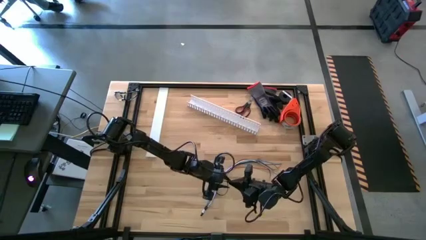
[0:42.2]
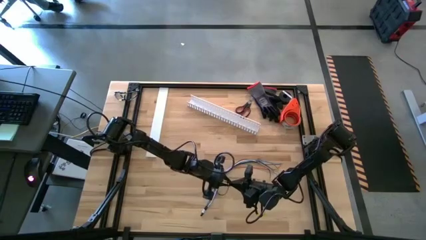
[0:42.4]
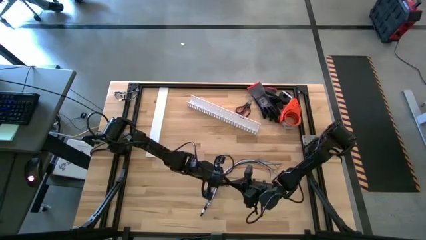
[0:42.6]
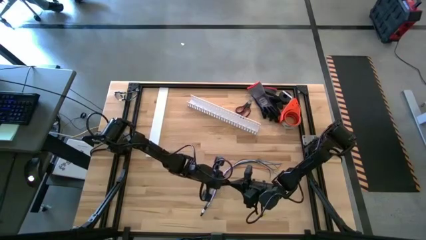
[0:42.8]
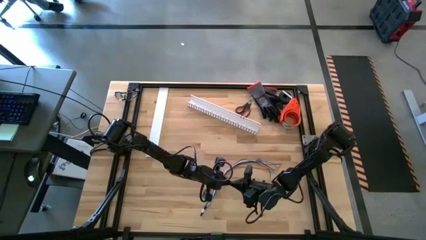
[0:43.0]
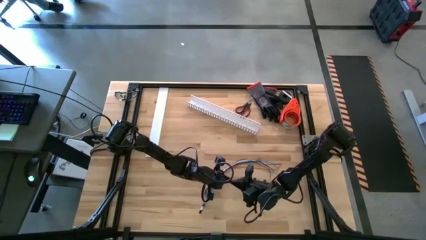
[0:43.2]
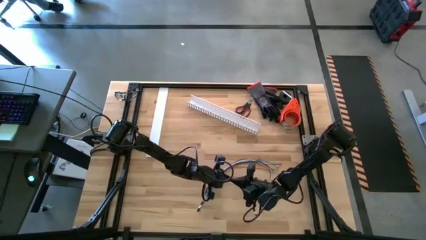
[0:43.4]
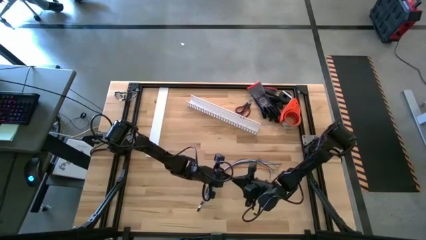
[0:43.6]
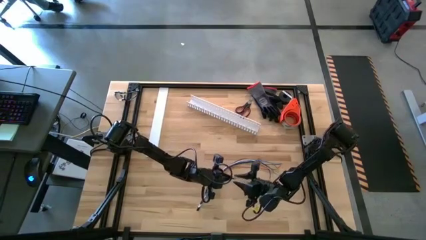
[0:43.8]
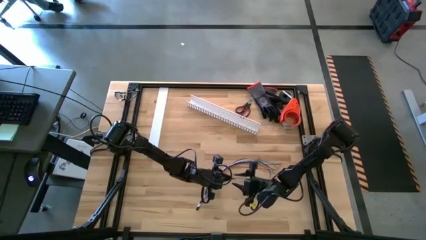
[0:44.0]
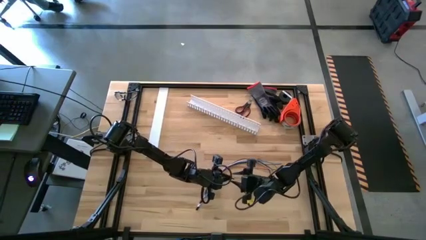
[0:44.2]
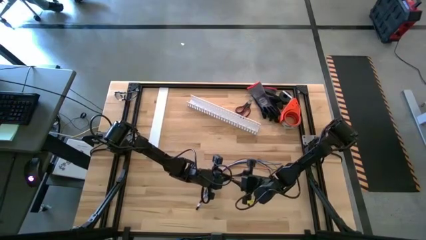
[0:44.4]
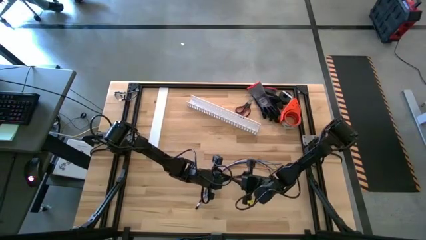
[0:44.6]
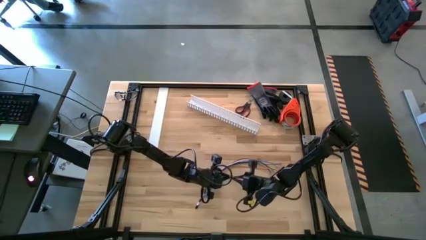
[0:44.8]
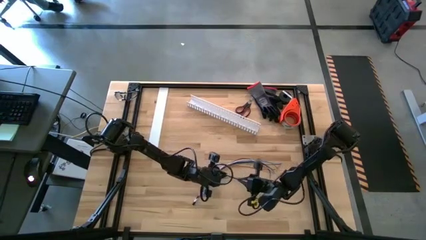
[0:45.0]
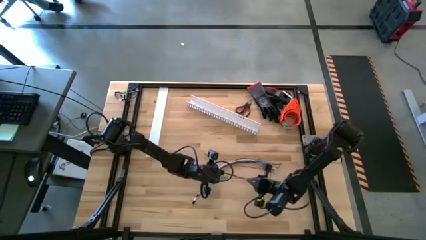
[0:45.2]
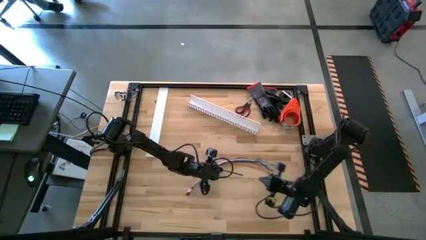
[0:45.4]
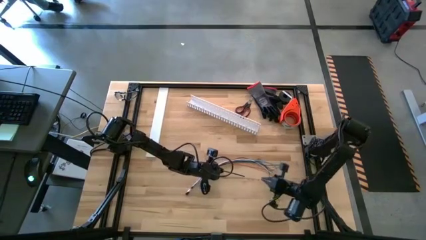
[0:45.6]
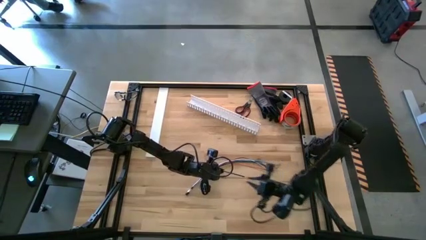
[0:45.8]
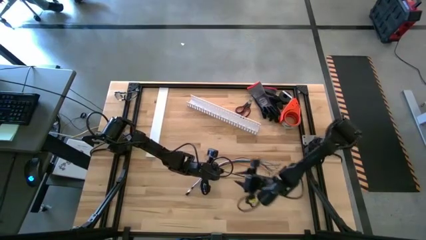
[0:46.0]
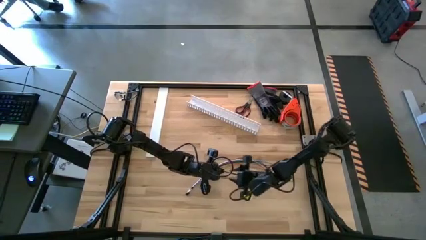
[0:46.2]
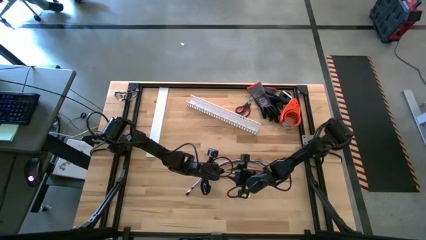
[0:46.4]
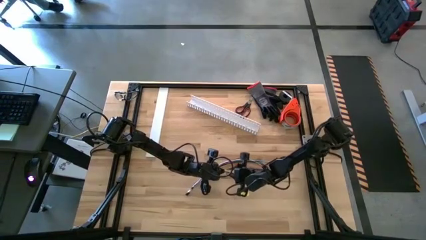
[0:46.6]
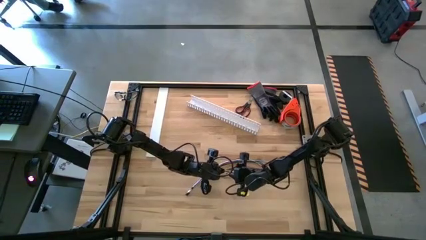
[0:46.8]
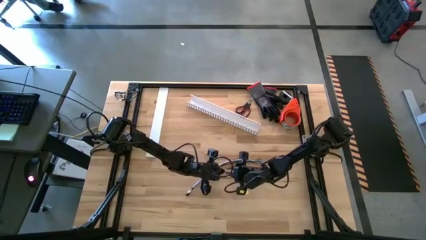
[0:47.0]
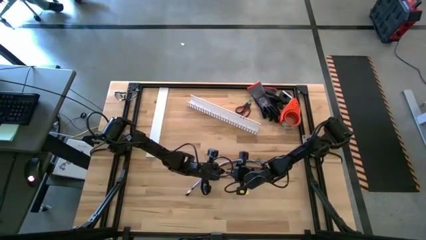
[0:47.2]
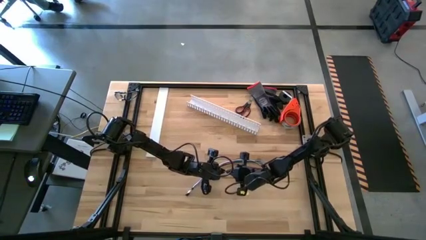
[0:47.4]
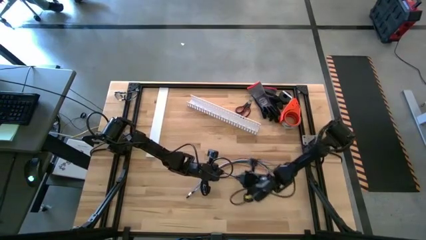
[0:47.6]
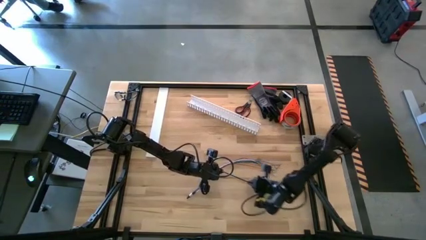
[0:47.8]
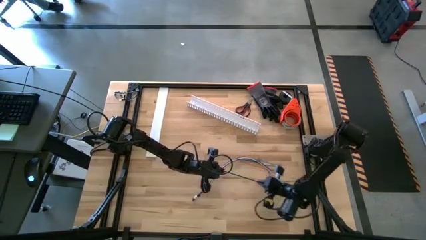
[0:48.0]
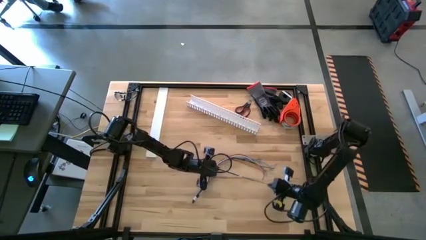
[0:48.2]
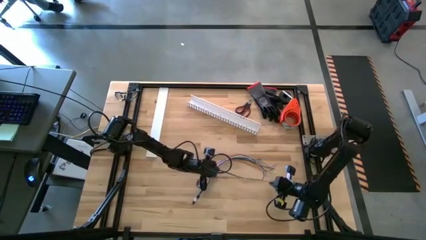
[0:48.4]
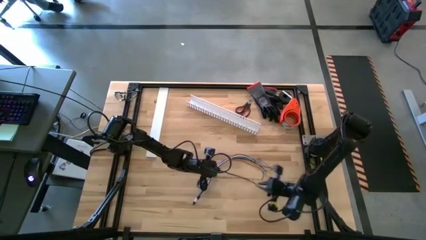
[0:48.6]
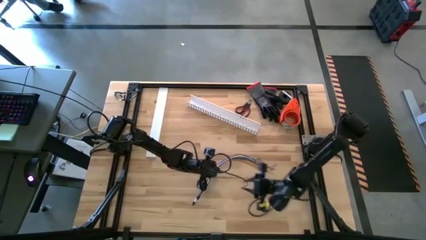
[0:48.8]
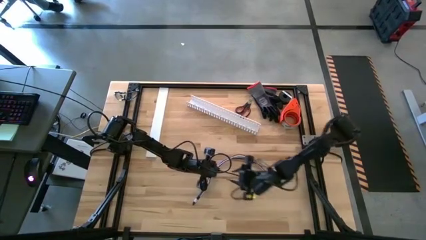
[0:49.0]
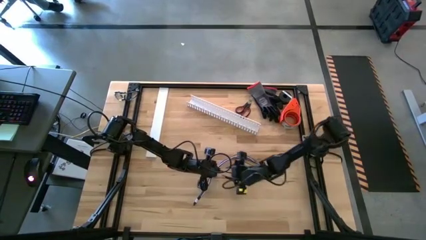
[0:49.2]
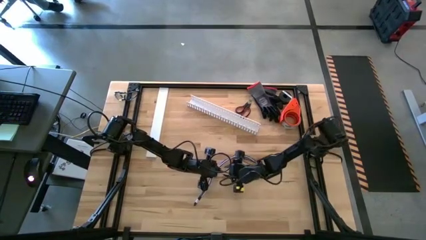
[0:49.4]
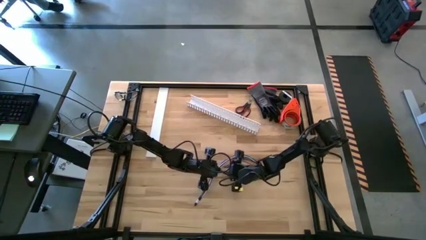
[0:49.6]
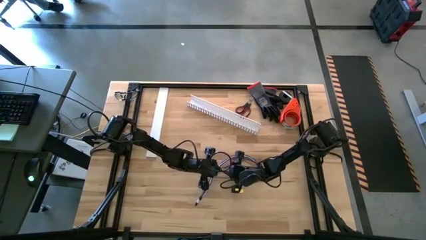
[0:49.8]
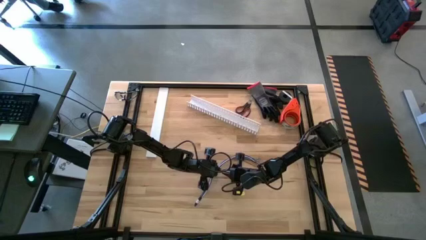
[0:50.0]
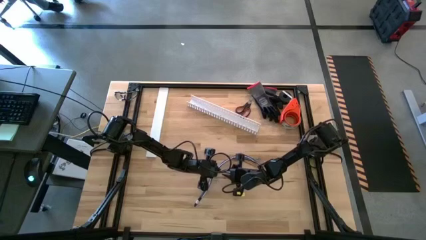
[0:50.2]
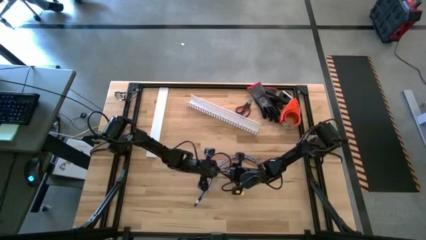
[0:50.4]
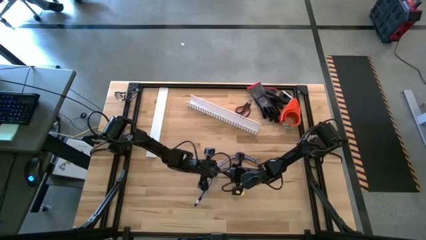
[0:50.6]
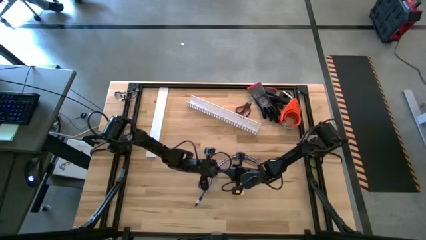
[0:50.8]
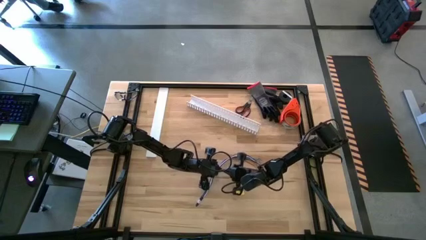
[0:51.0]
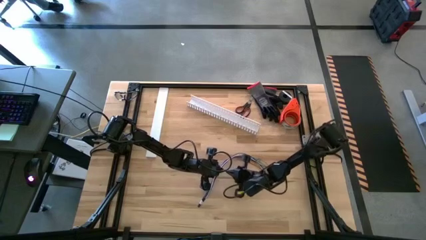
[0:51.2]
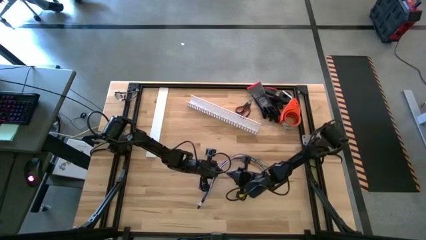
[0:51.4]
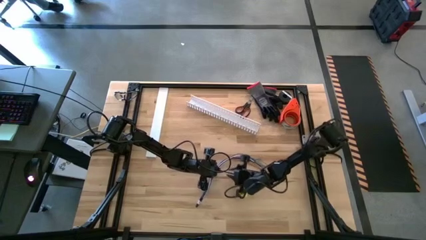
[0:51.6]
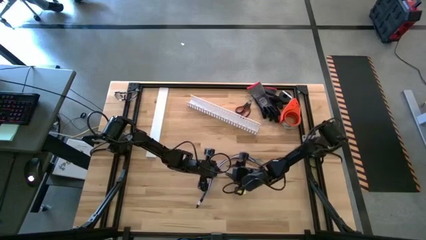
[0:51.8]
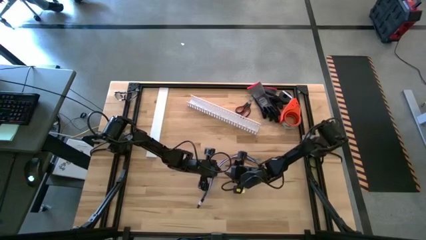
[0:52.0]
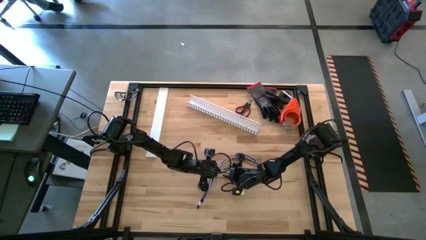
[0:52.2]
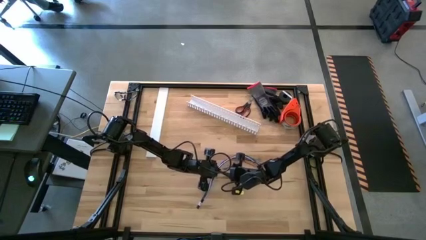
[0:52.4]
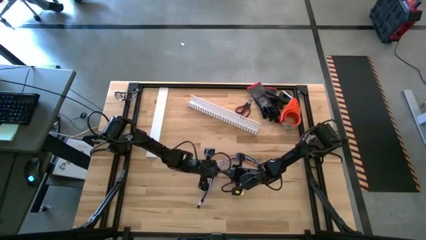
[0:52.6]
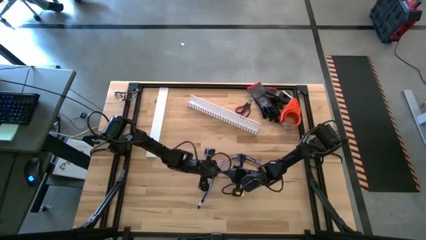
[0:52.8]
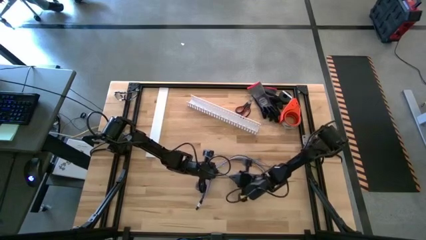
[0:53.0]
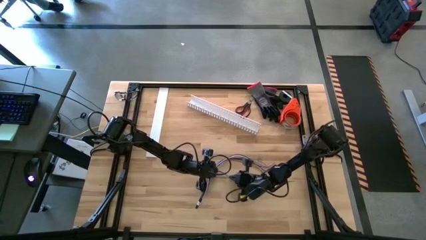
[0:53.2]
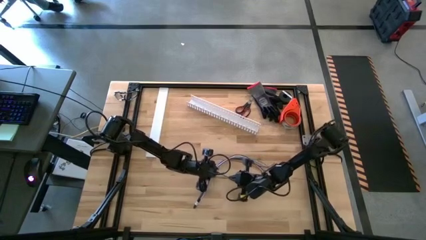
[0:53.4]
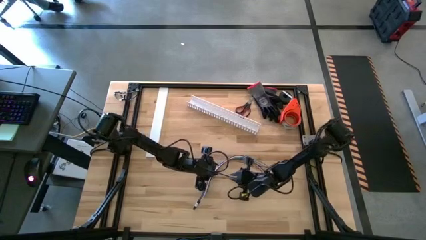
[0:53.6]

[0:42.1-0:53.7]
Task: Ziptie cables
Wrap the black zip tie on the cable wires

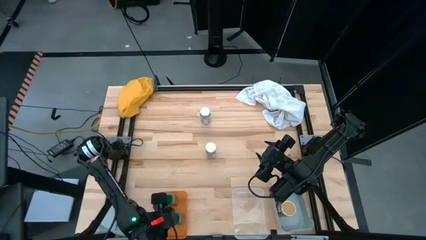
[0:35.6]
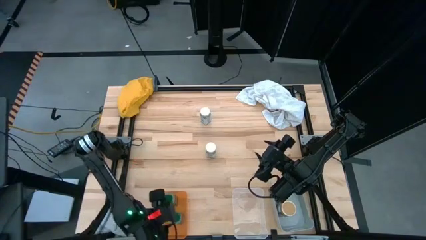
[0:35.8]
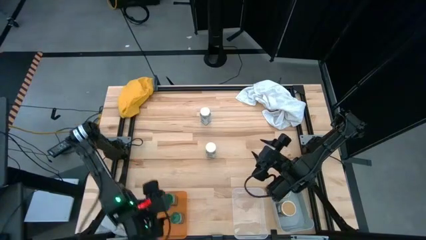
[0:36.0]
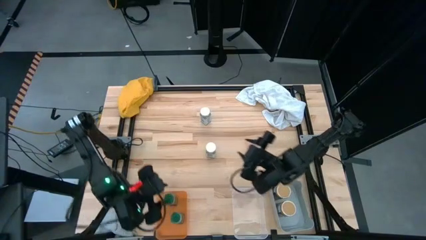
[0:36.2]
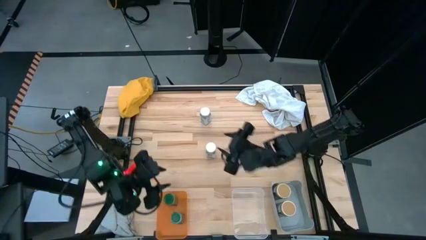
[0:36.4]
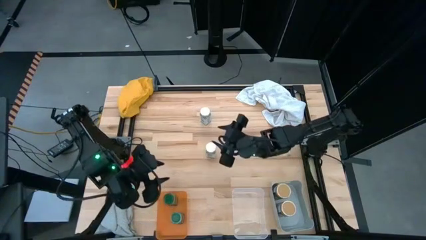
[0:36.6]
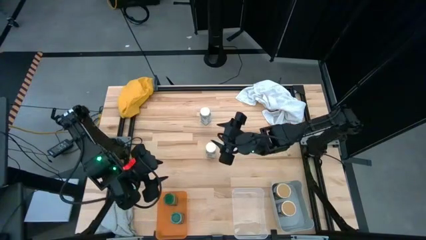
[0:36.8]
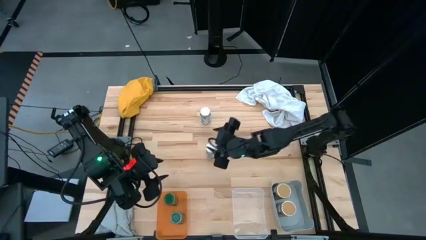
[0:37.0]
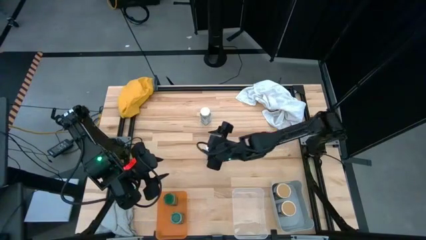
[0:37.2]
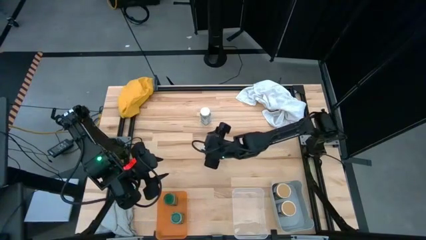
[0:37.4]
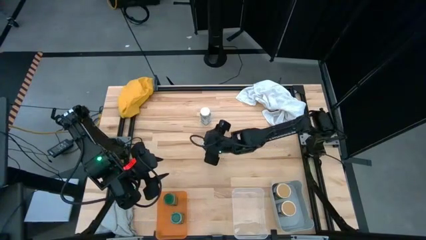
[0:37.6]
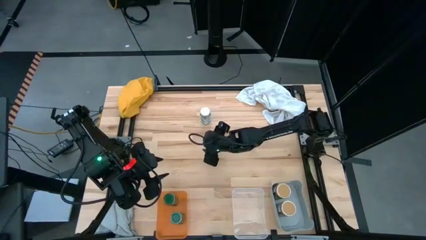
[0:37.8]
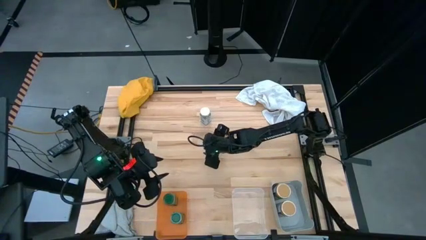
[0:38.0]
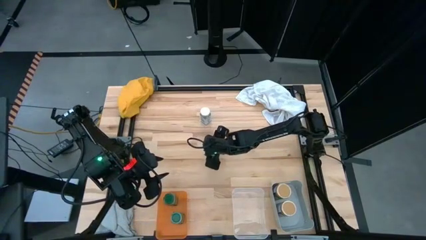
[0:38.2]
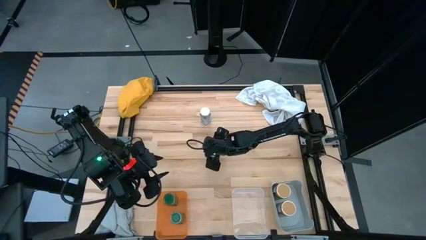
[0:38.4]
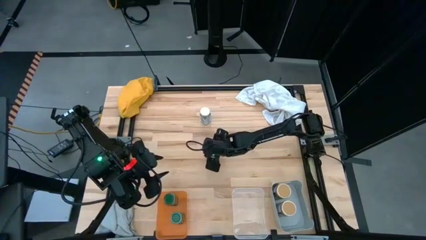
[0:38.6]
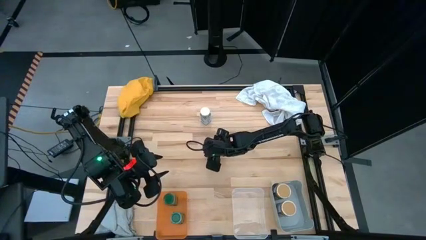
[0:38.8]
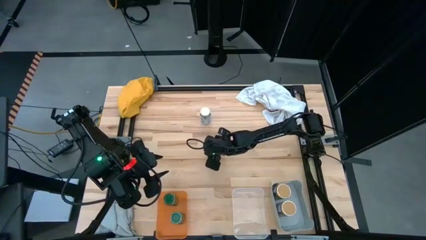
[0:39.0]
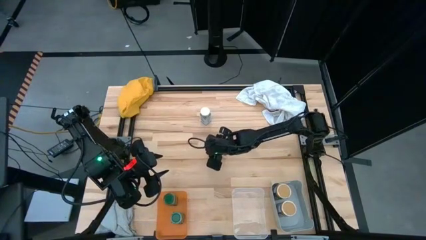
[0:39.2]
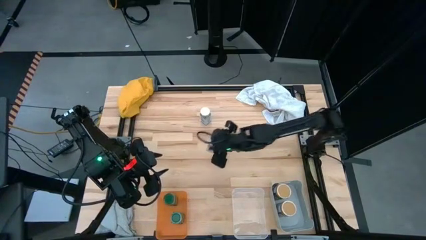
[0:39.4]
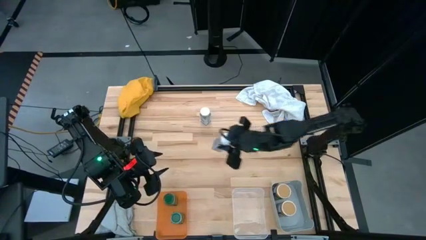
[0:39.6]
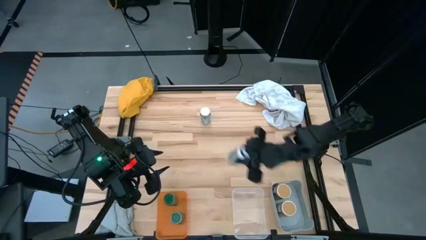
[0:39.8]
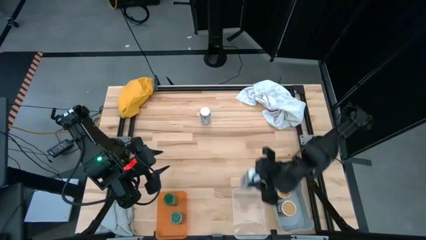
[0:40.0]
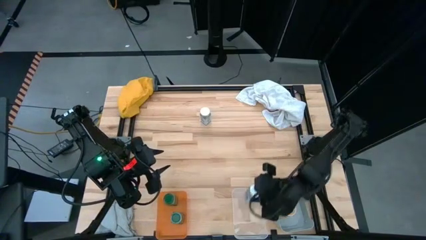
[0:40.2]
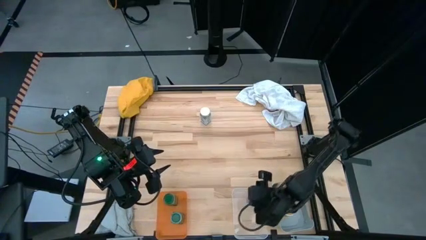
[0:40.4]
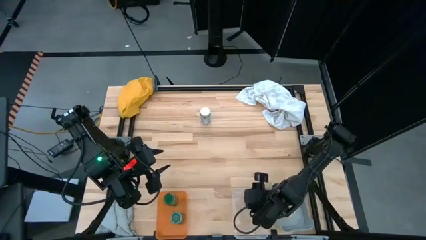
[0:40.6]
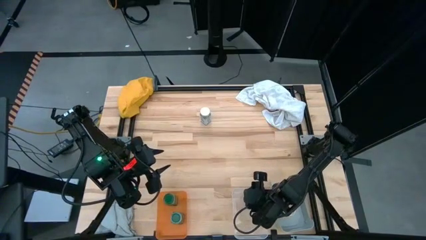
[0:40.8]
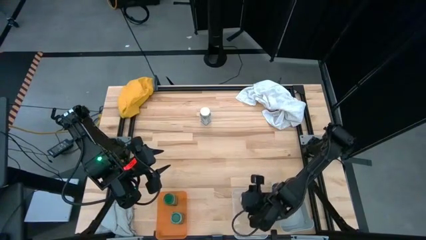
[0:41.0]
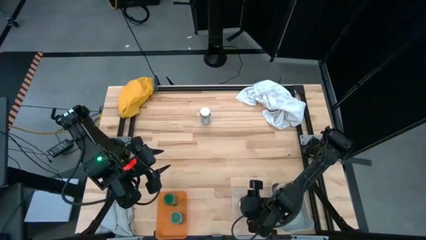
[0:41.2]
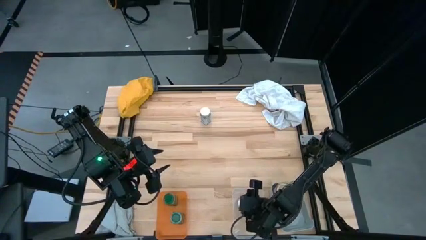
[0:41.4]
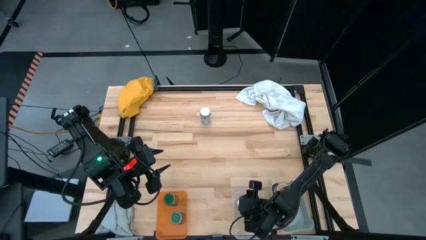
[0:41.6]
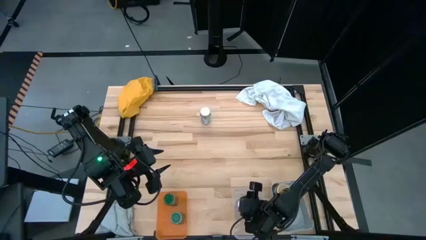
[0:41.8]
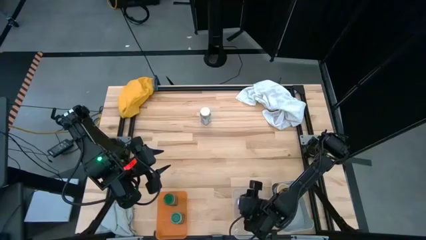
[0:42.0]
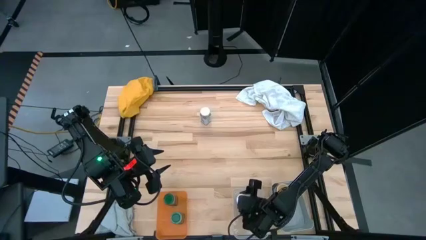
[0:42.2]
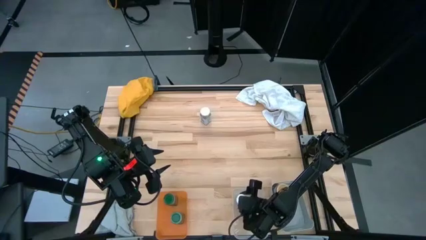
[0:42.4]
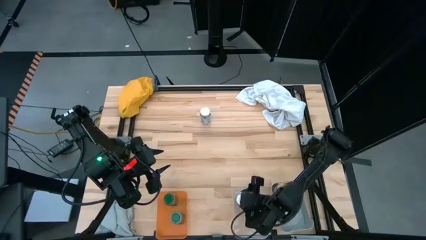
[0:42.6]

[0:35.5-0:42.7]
Task: Sort spices by type
Put the bottom white spice bottle into the transparent bin
